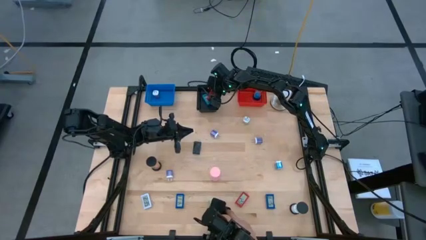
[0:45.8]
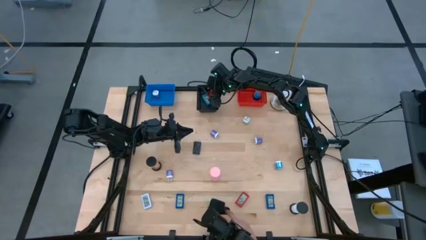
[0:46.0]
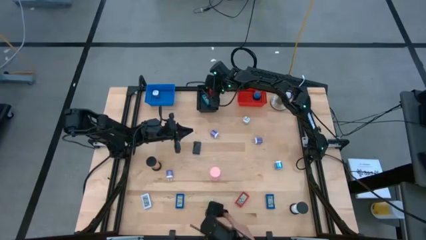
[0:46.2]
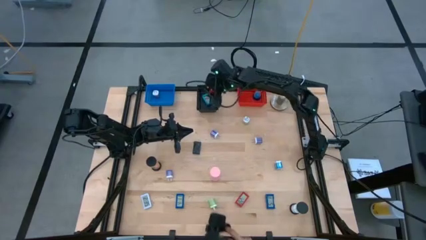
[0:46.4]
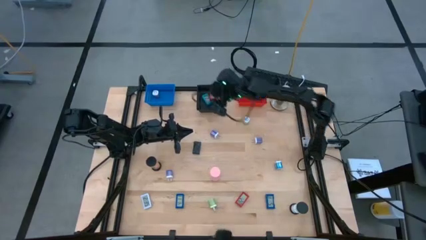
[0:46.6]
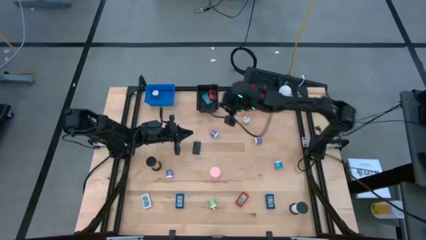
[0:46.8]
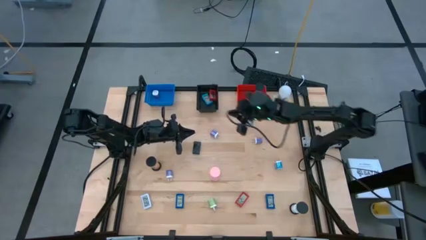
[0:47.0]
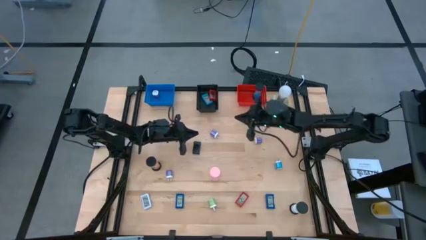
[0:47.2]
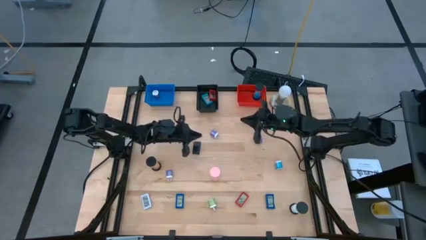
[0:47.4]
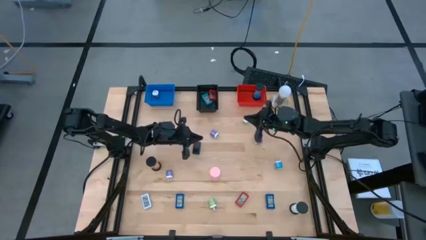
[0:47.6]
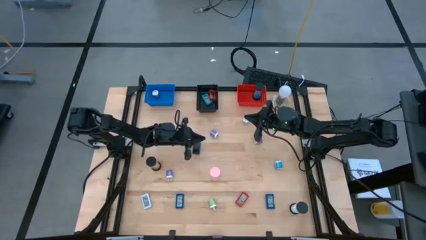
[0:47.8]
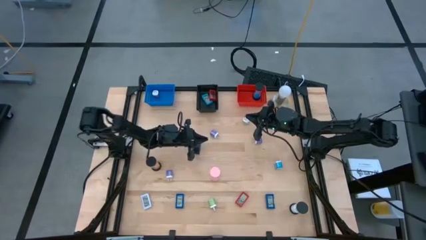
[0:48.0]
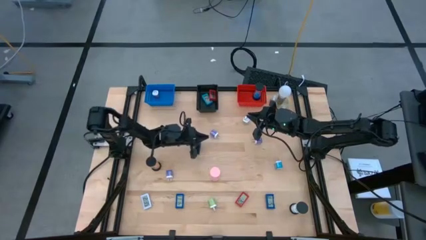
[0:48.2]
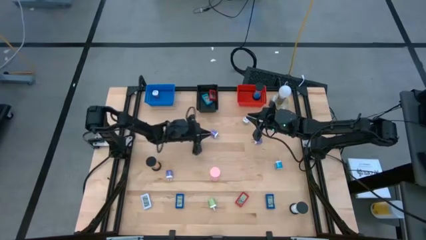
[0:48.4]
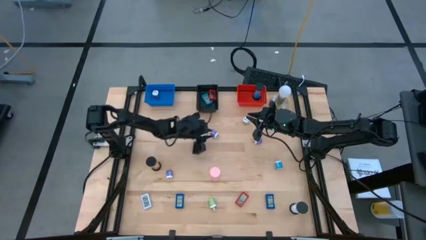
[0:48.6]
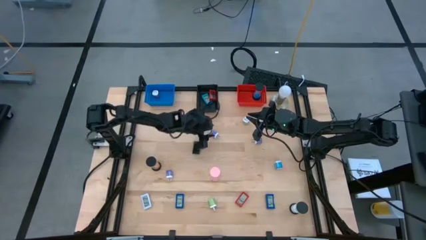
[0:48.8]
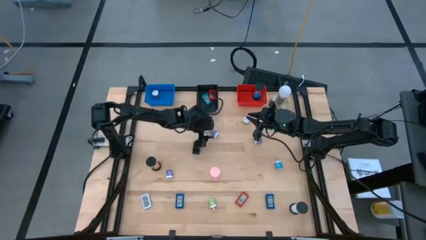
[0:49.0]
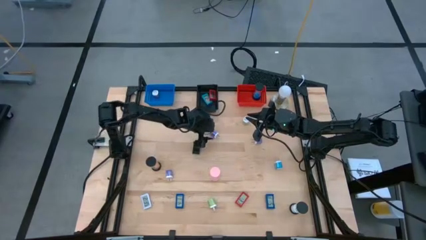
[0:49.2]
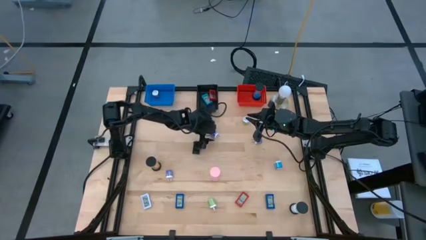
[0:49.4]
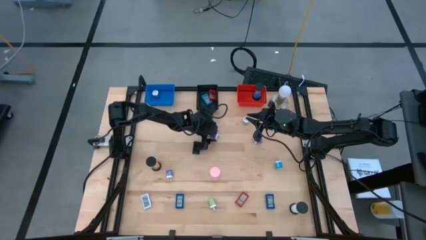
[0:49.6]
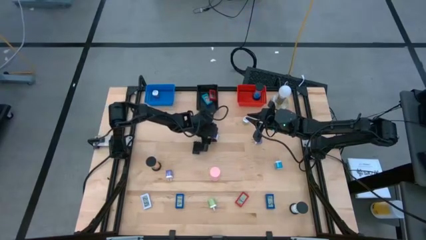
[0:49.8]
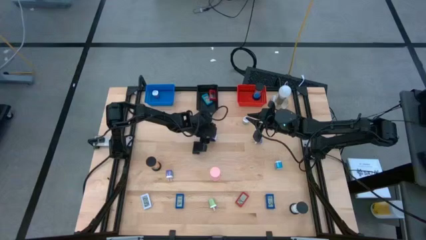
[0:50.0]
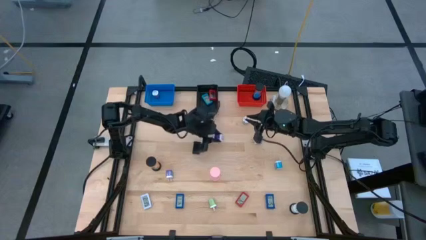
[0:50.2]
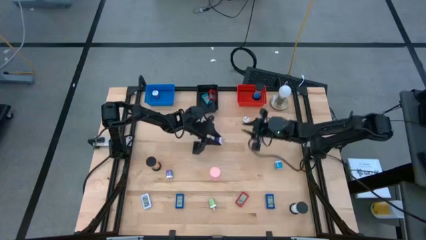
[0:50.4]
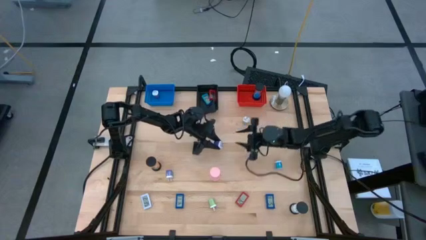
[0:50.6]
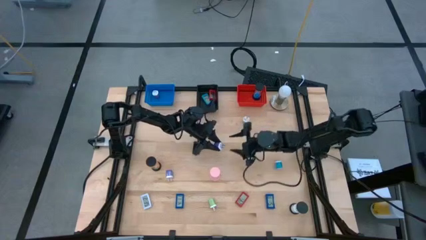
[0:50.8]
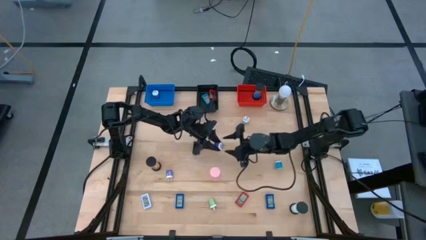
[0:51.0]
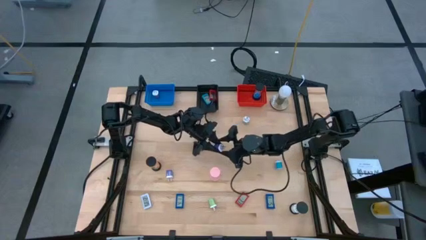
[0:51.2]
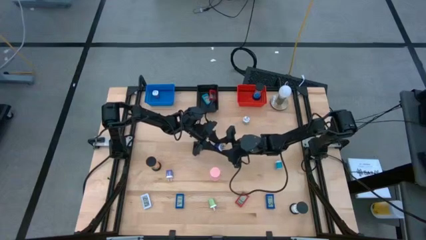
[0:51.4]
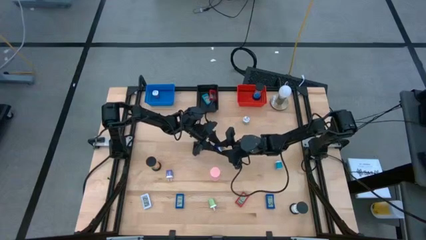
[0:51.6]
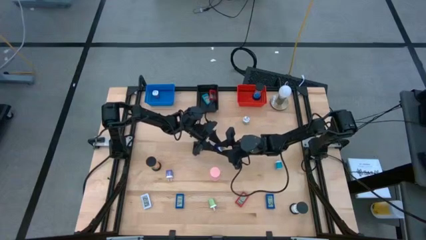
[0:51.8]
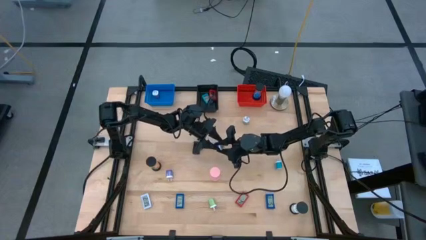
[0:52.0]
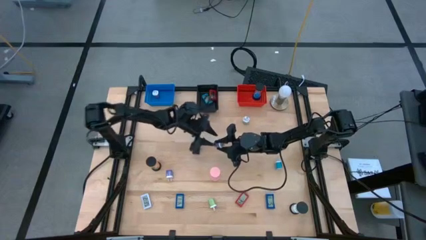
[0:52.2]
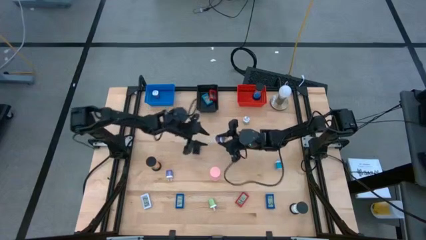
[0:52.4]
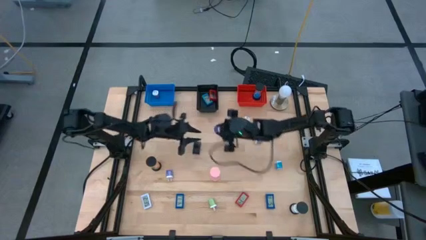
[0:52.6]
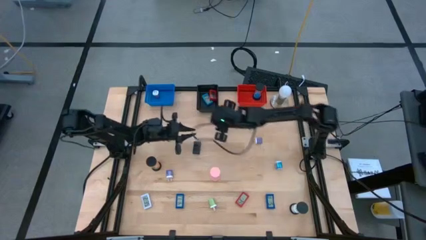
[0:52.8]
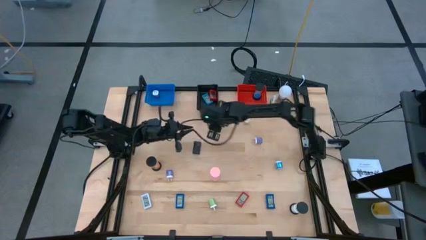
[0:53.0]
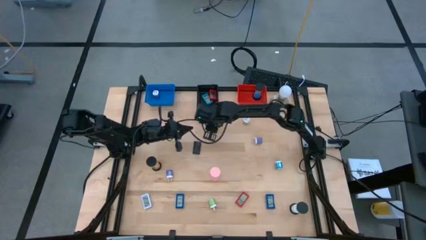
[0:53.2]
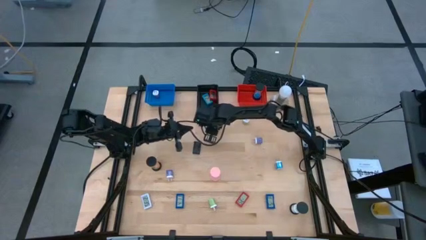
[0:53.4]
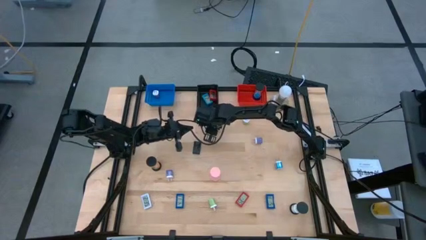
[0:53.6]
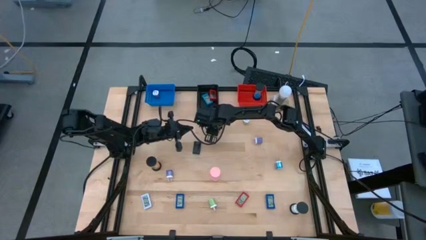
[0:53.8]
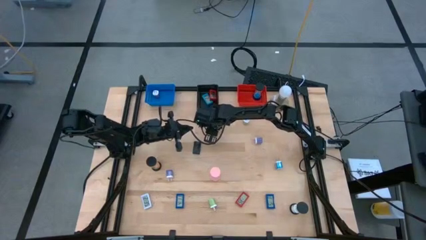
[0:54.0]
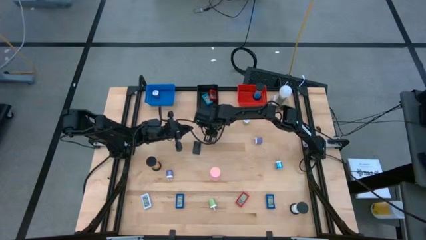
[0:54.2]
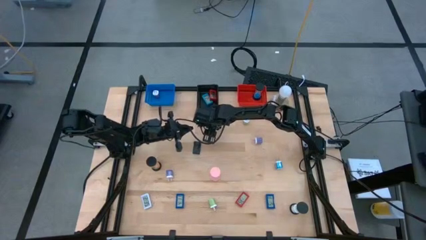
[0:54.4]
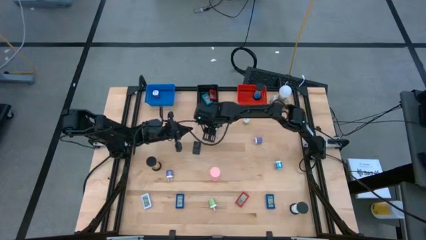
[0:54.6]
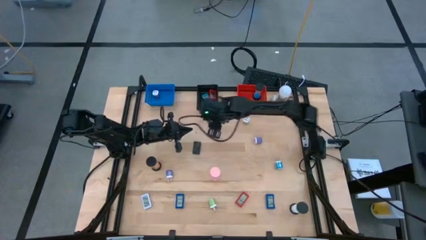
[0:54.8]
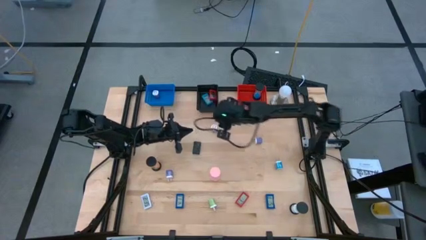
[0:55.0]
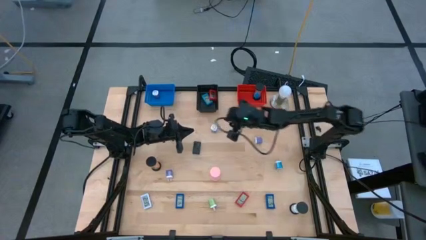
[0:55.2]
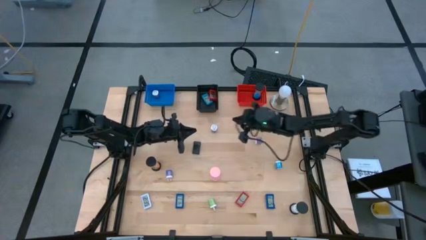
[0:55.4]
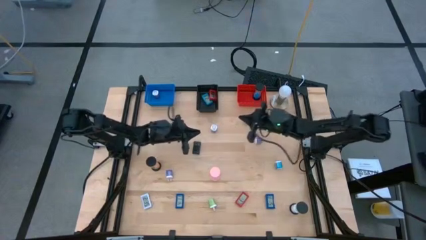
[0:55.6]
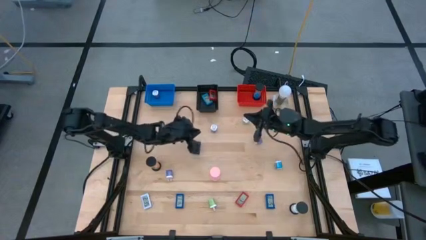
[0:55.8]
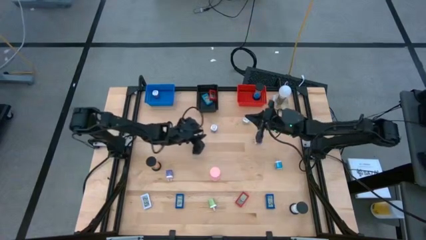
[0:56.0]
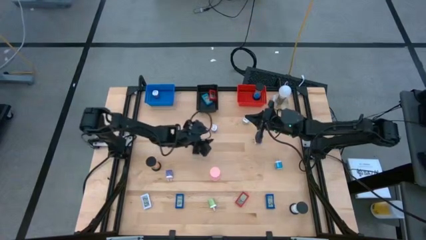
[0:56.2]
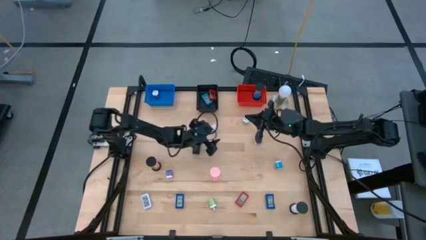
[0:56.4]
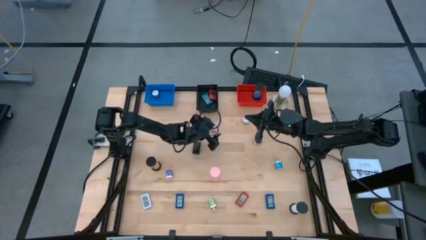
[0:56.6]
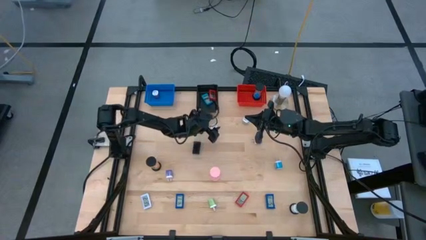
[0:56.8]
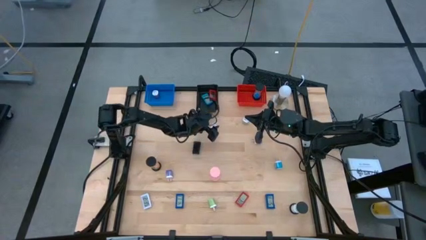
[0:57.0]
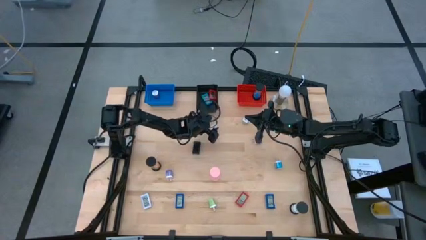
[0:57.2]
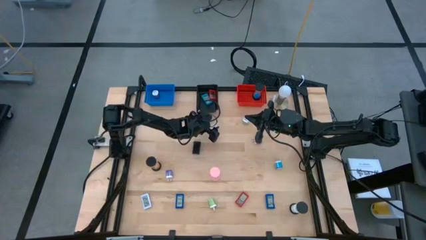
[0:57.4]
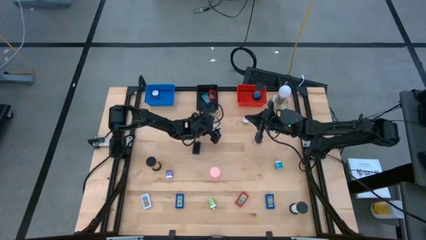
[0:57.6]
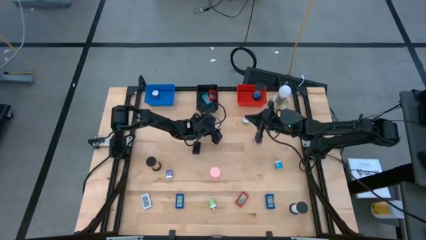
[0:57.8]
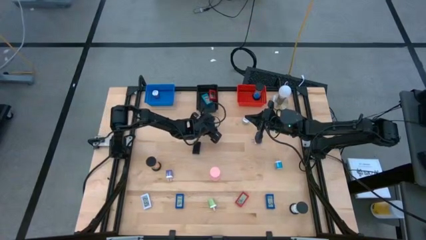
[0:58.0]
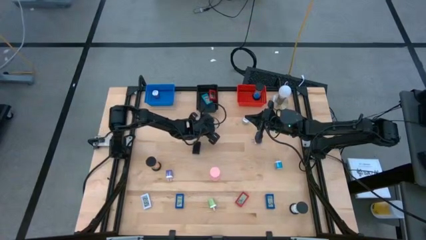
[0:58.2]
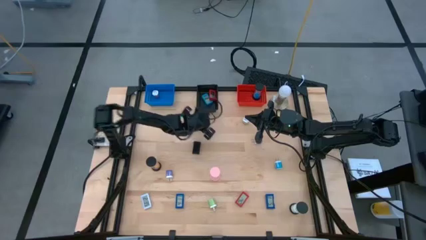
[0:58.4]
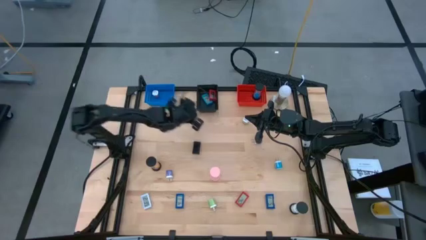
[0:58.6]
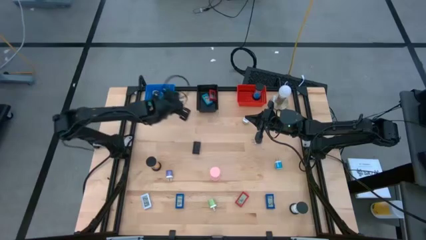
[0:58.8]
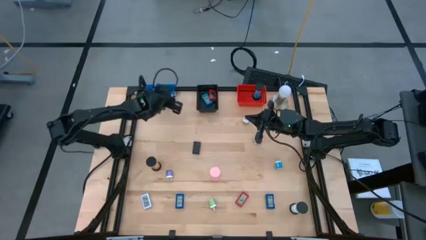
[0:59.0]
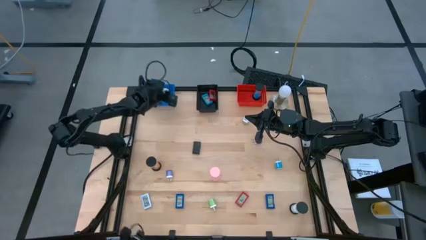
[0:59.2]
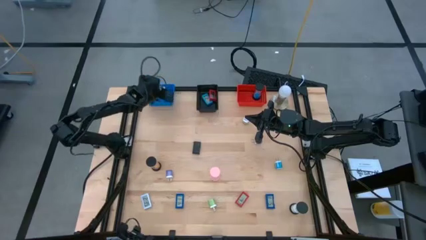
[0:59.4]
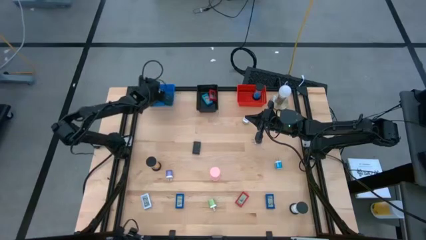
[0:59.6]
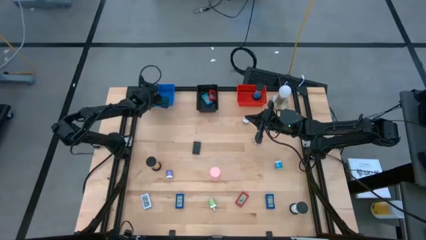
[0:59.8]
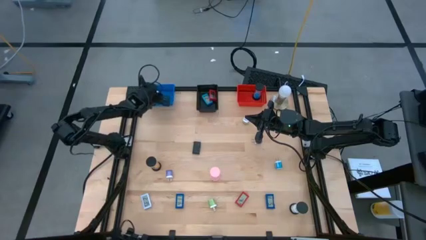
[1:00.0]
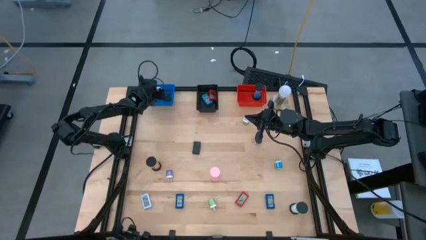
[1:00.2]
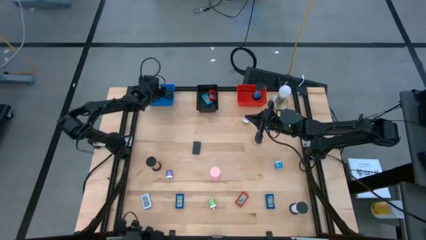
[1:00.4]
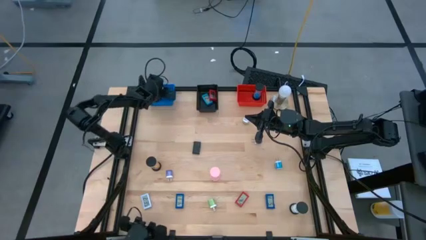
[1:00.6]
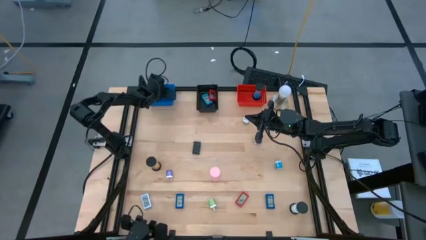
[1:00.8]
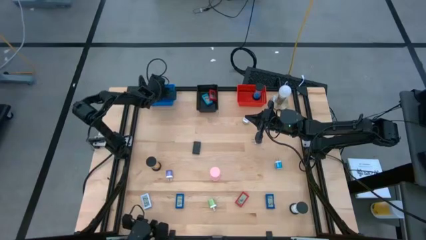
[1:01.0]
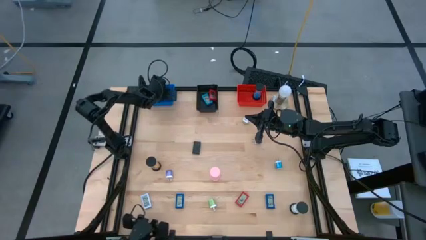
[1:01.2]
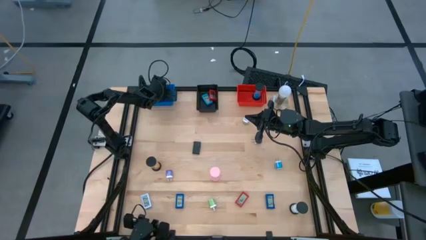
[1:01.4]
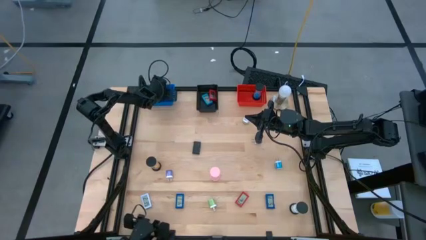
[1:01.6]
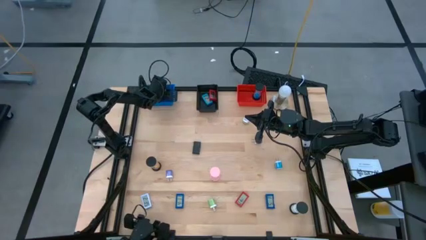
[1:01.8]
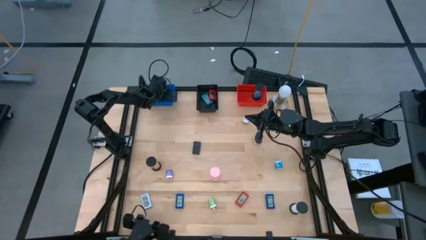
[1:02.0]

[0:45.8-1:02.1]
Task: Pick & Place Office items
Put the top left purple charger adapter into the blue bin
